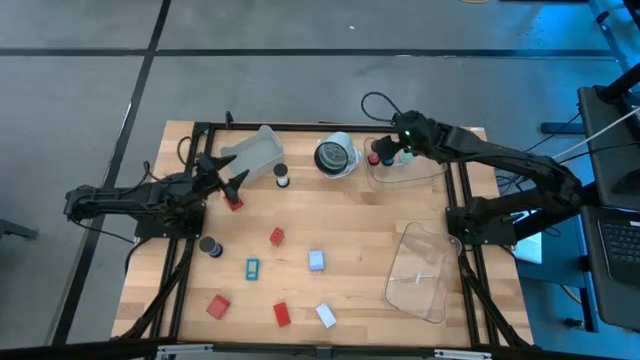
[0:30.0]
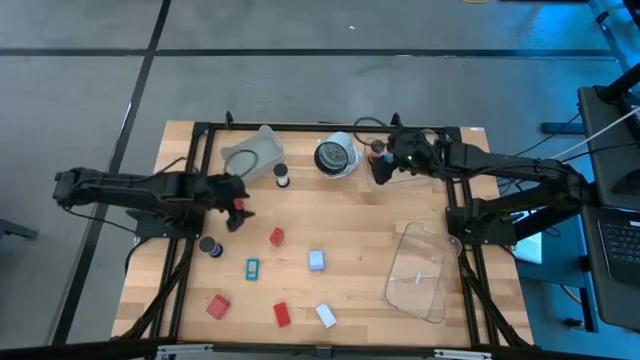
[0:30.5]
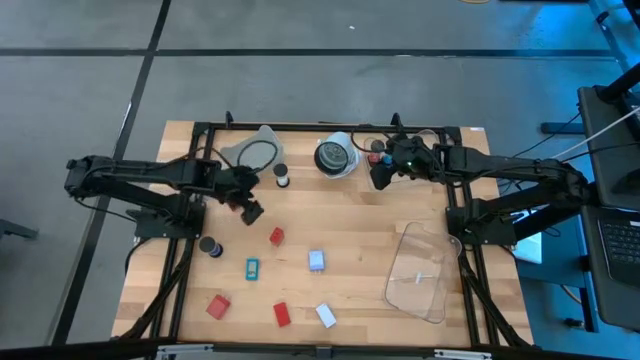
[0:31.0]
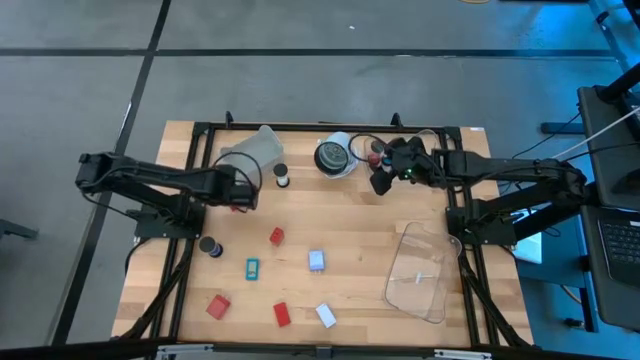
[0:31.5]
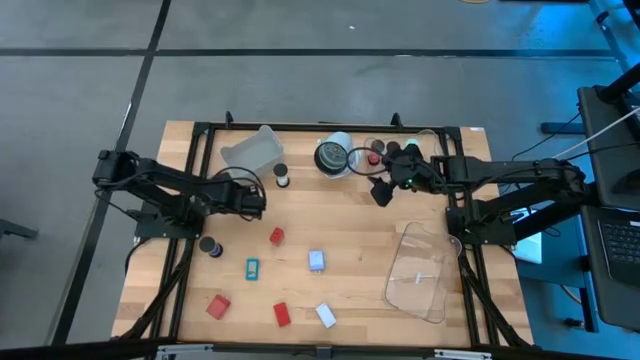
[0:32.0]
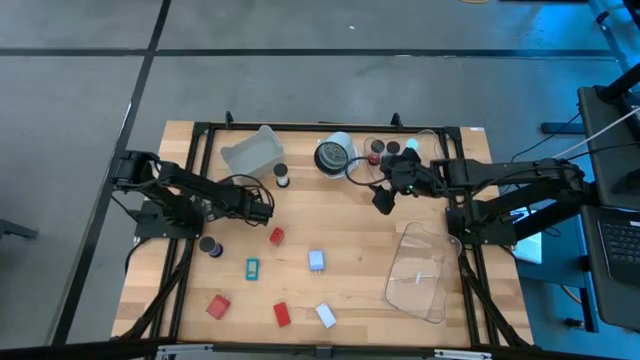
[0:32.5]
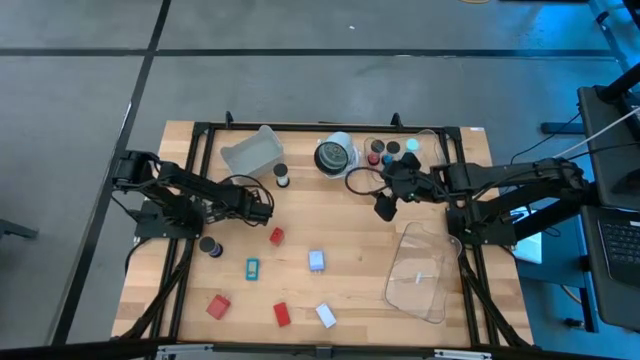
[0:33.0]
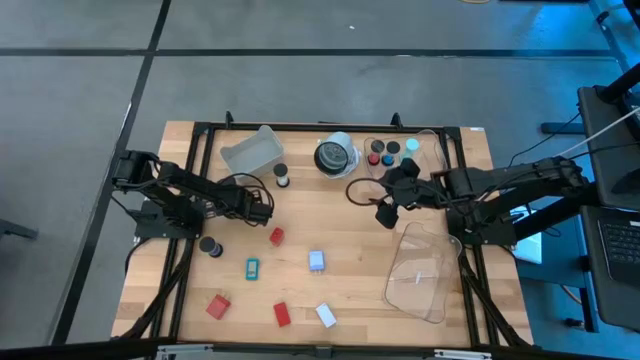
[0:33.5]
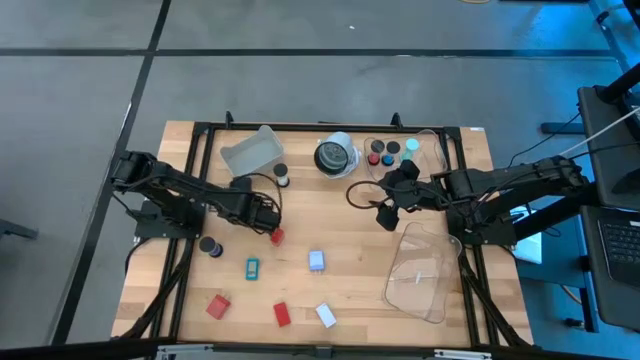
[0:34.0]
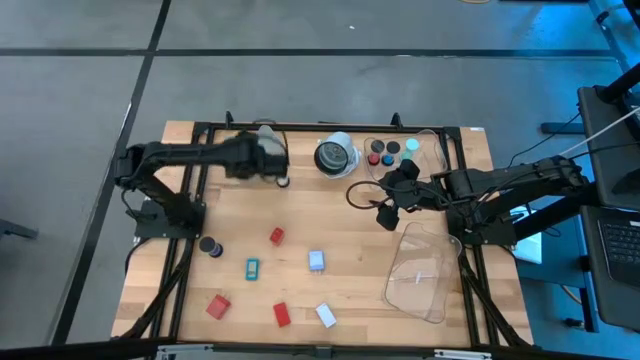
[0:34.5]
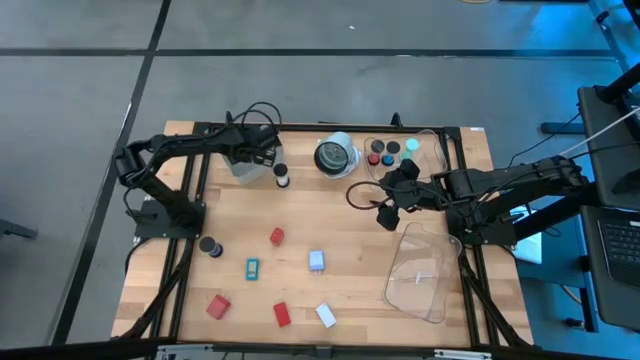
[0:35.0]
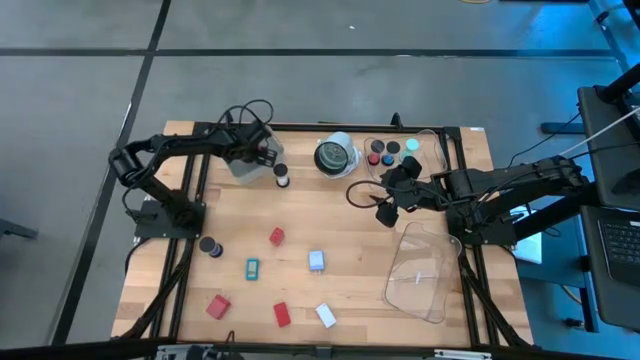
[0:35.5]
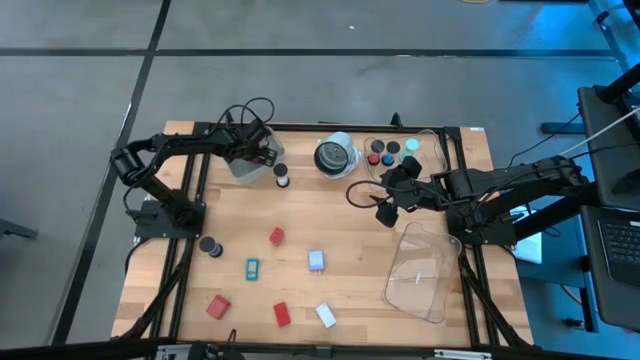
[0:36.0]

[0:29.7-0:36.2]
Task: Pick & Place Office items
Put the top red charger adapter into the gray bin

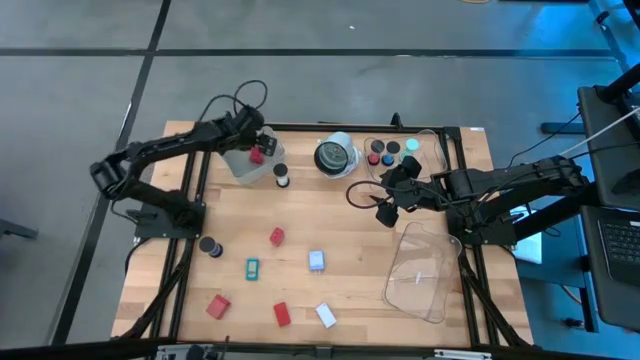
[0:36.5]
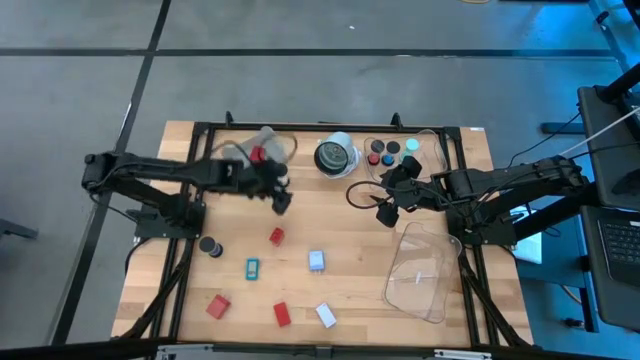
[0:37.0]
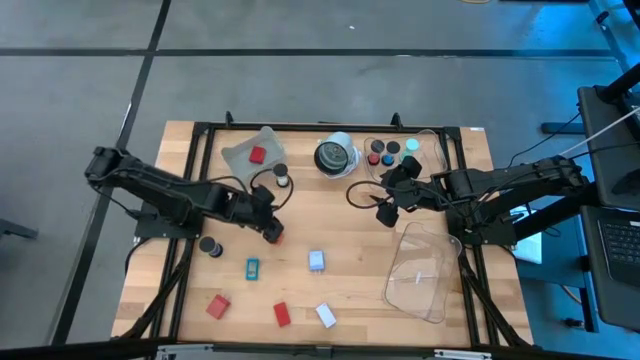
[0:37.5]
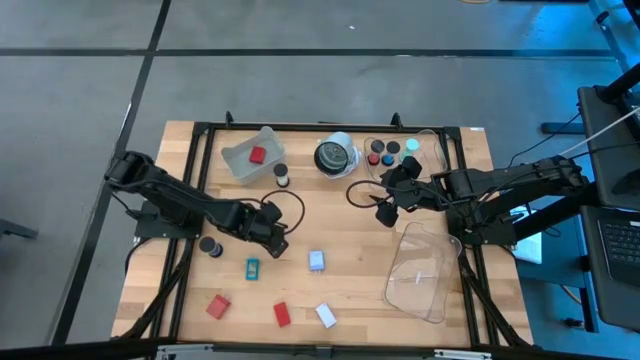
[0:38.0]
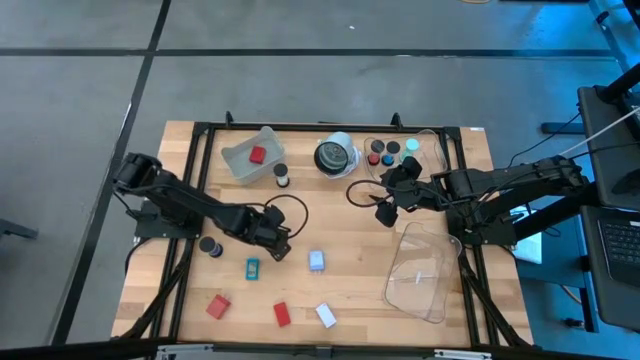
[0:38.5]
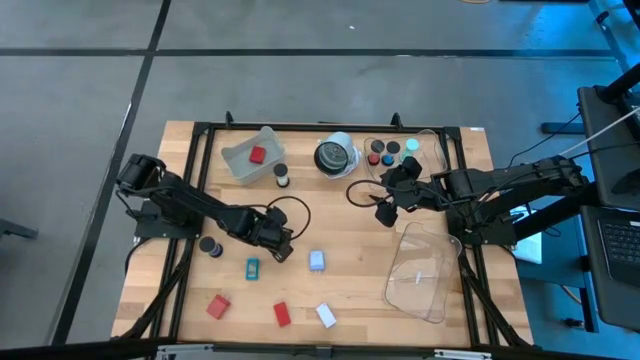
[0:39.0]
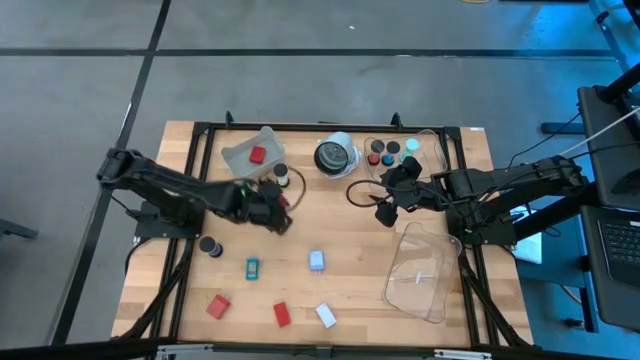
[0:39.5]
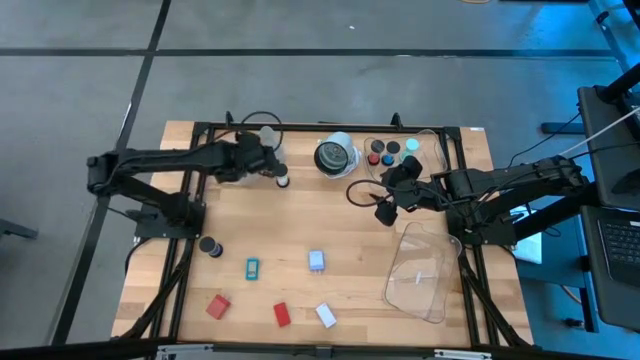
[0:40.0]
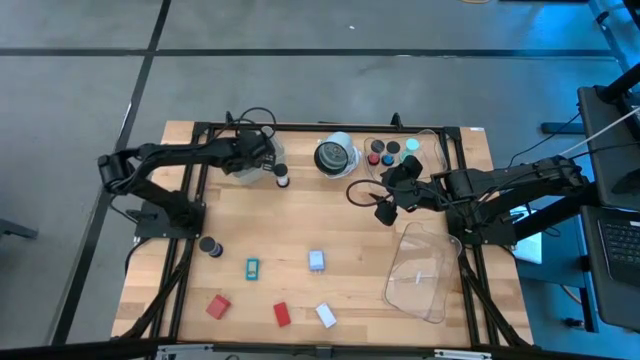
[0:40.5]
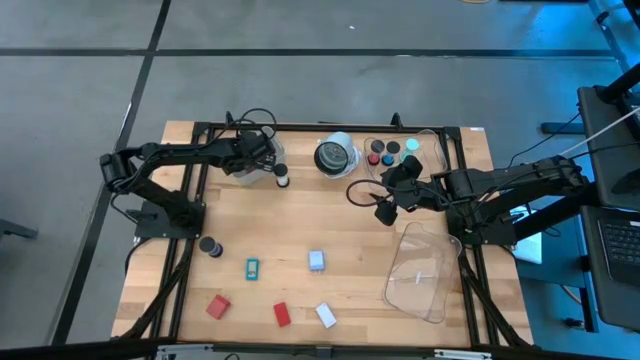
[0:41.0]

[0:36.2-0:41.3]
Put the top red charger adapter into the gray bin

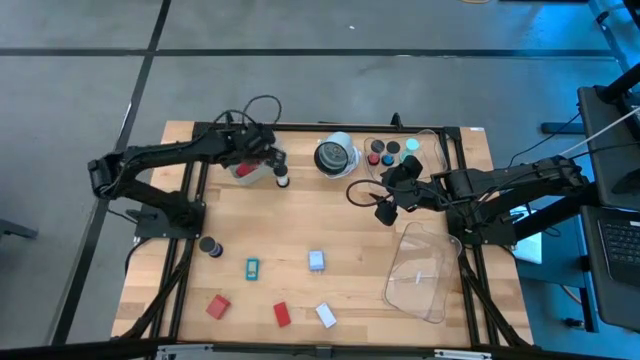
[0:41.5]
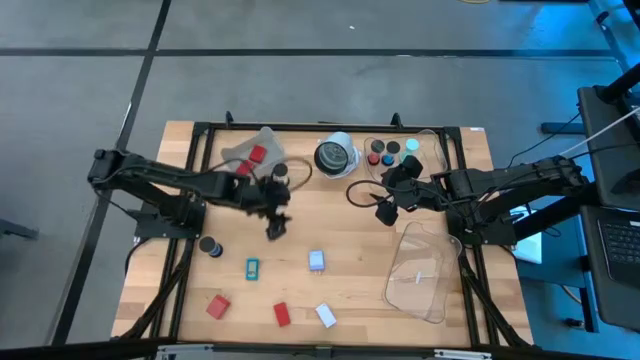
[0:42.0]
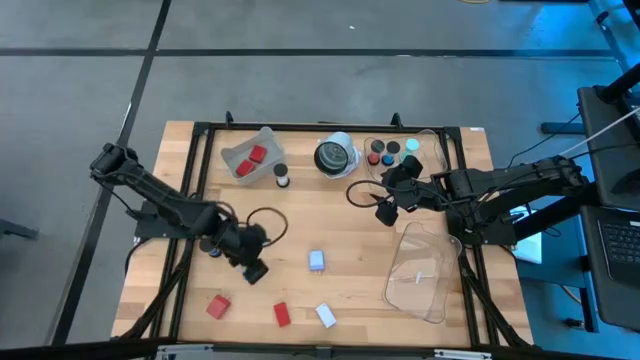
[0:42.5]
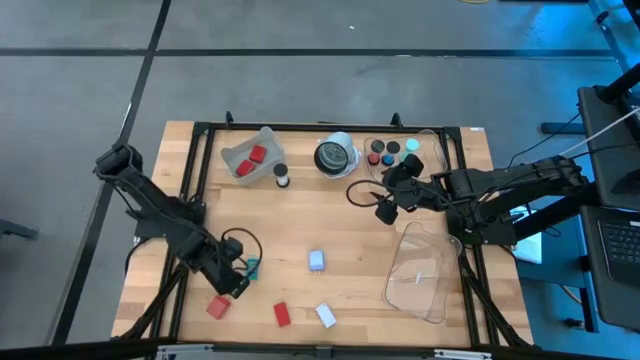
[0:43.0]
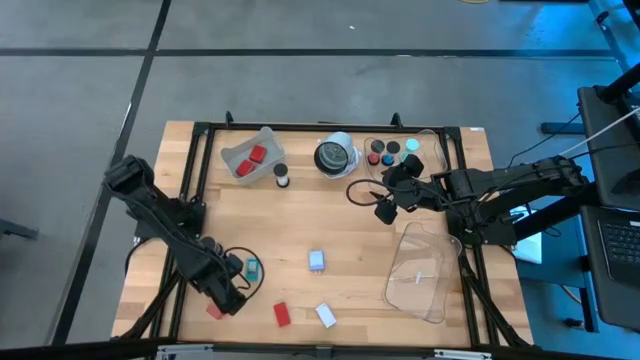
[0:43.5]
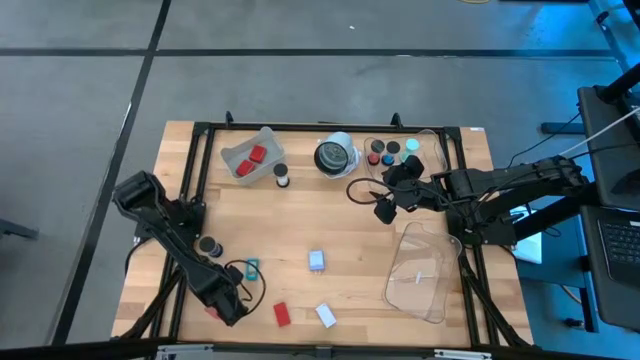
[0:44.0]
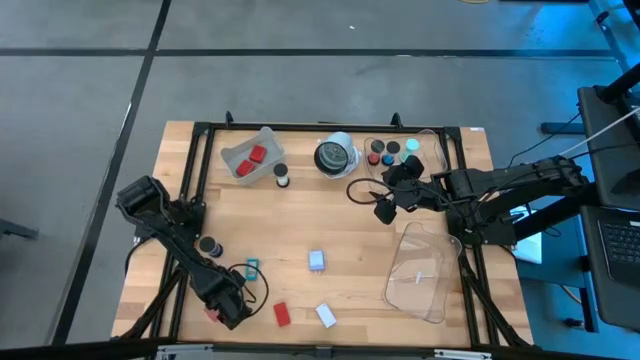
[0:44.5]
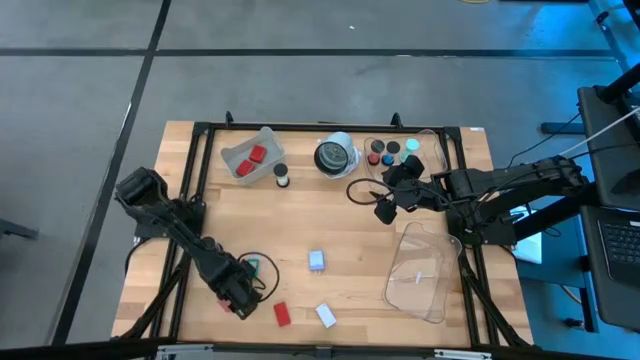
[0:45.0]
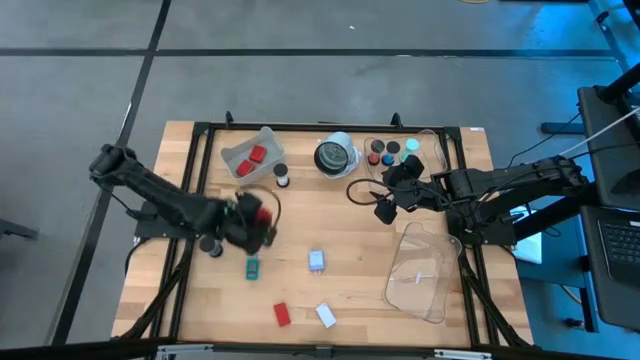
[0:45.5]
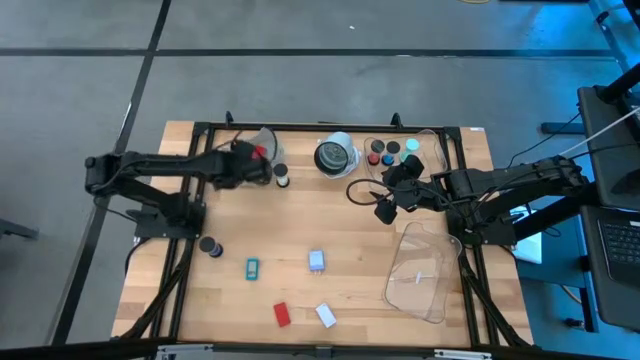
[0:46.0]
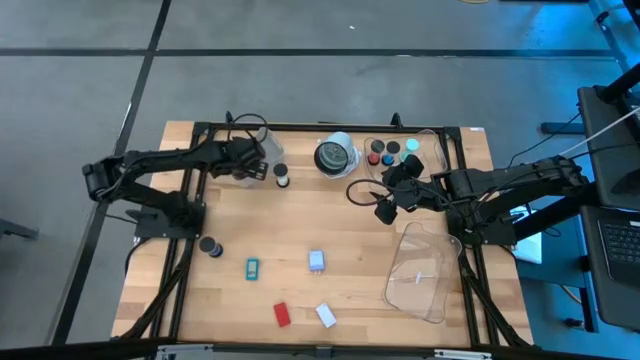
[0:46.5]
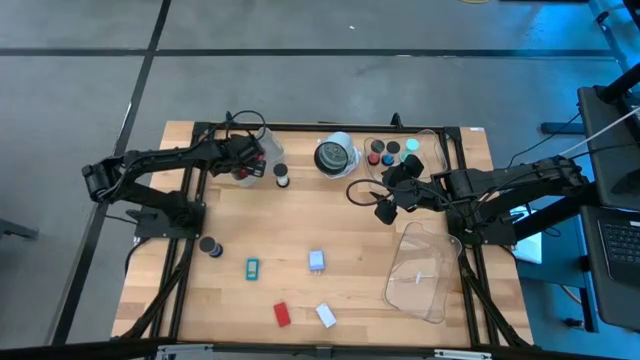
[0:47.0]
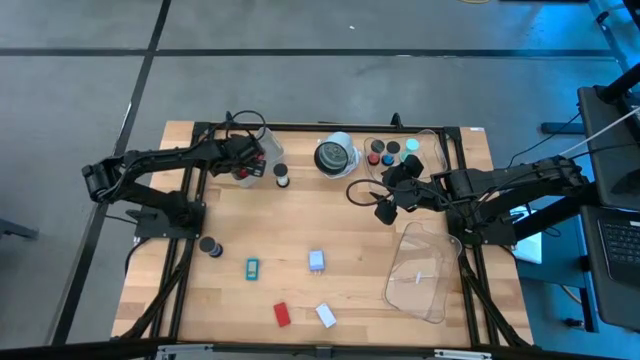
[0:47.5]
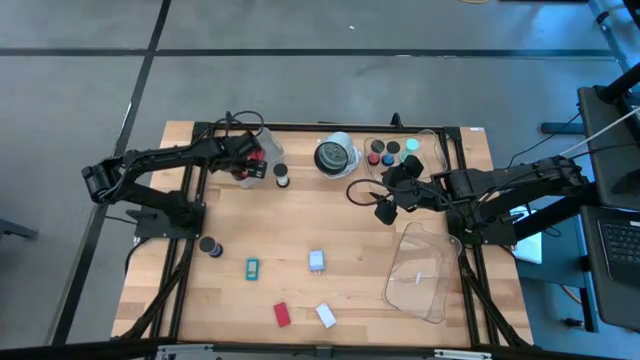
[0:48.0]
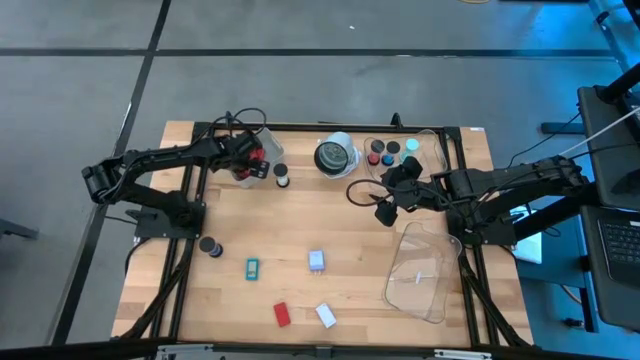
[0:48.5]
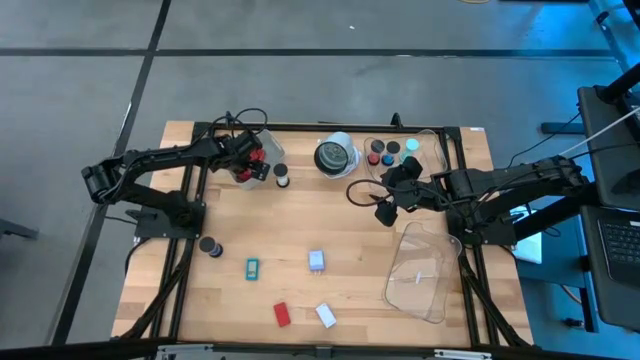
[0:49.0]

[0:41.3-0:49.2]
Put the red charger adapter into the gray bin

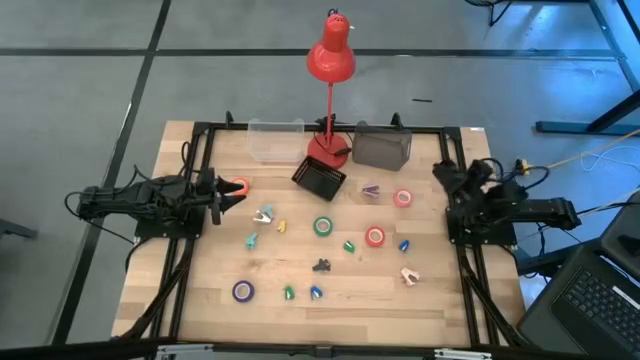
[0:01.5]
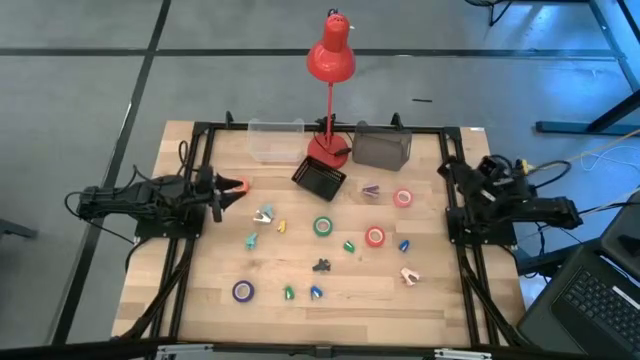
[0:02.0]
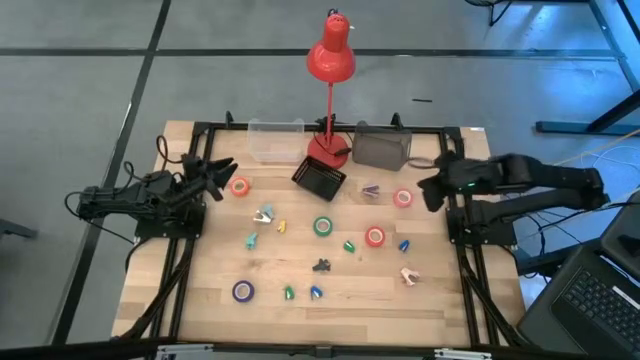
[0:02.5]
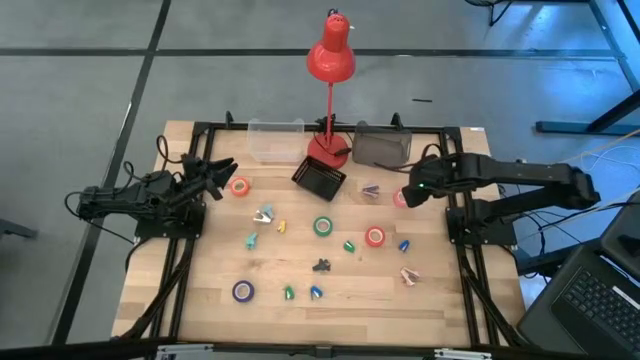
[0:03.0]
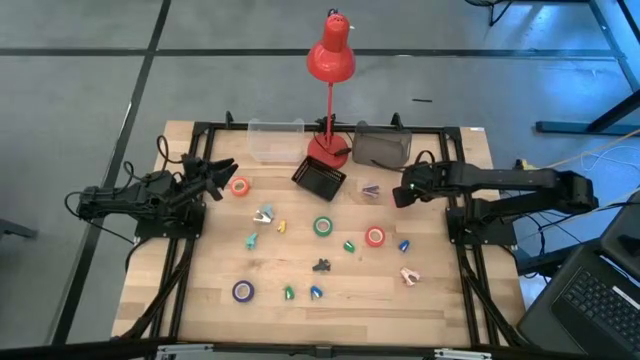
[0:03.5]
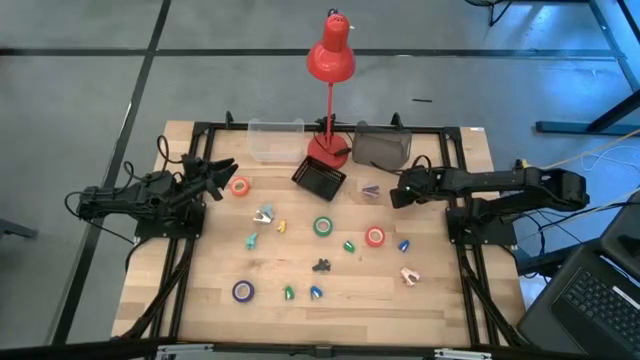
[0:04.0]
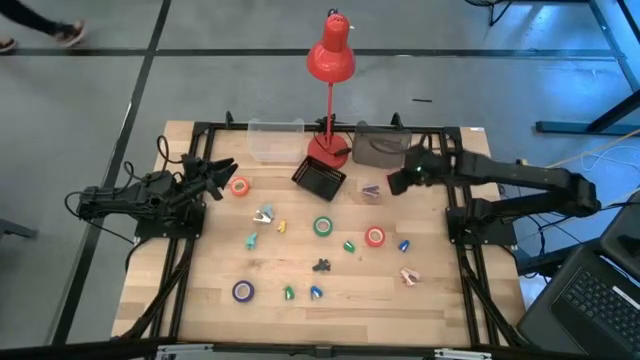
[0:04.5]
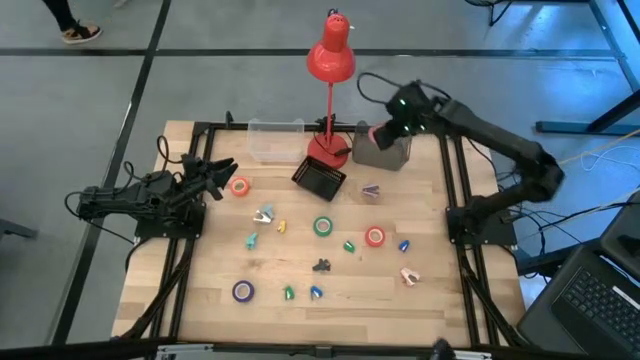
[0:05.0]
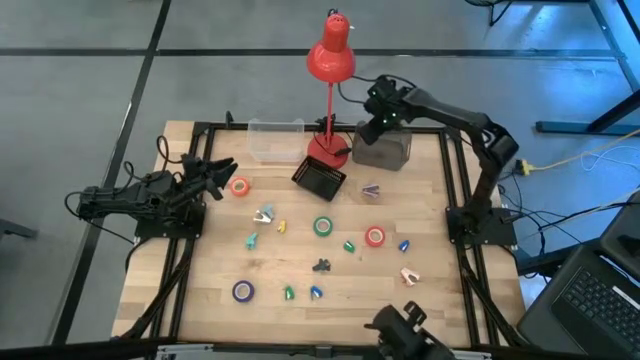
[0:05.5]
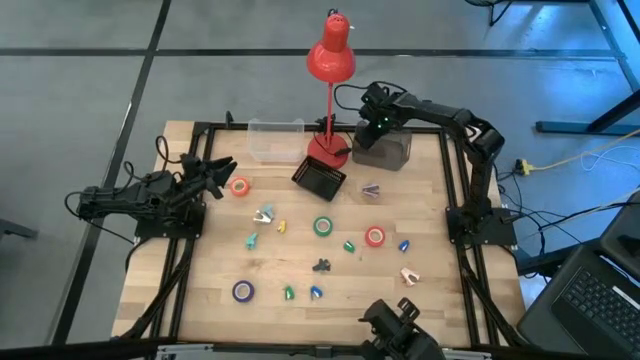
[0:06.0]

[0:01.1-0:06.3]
Task: Pick and place Stapler, Stapler remover, tape
Put the pink tape into the gray bin
